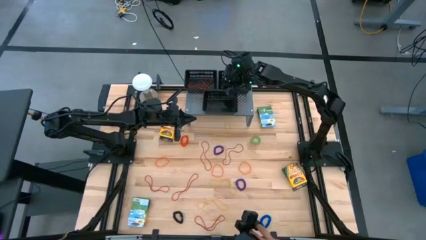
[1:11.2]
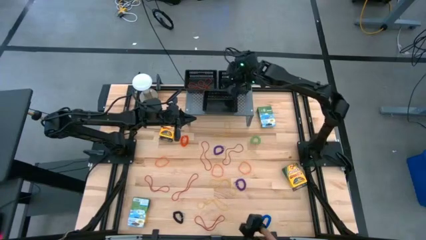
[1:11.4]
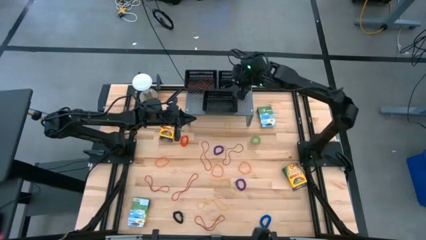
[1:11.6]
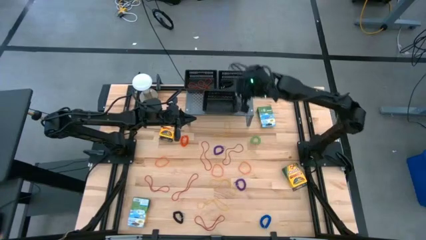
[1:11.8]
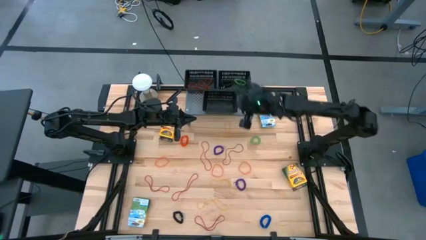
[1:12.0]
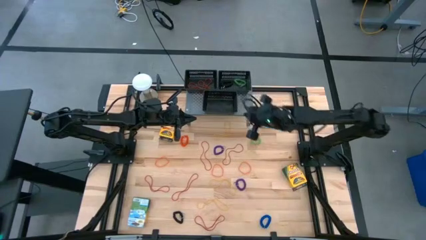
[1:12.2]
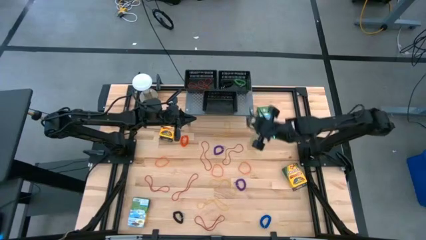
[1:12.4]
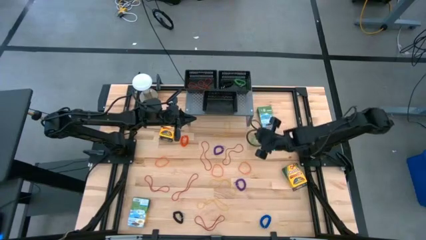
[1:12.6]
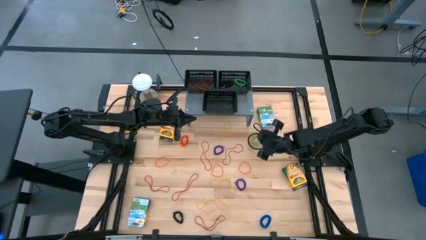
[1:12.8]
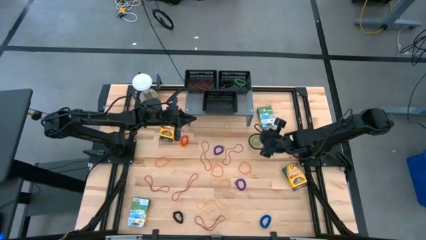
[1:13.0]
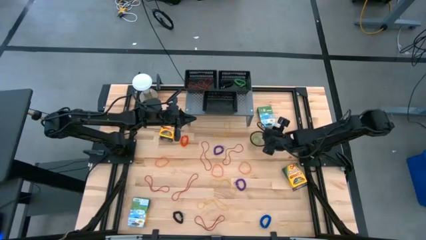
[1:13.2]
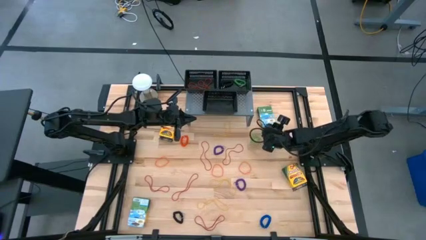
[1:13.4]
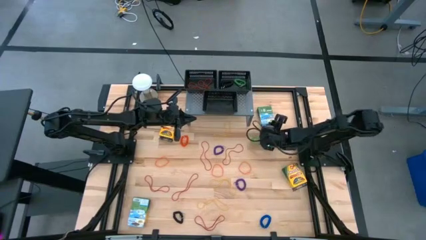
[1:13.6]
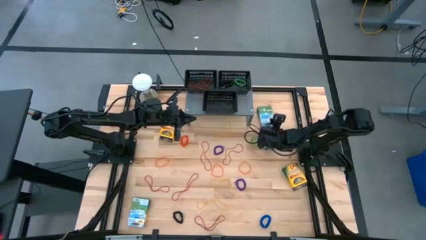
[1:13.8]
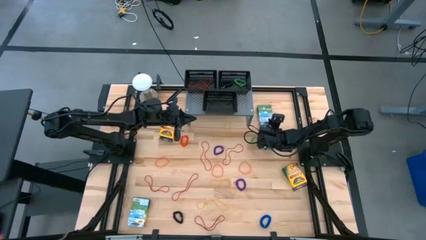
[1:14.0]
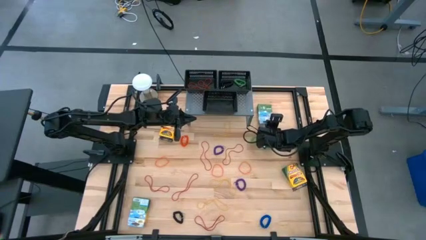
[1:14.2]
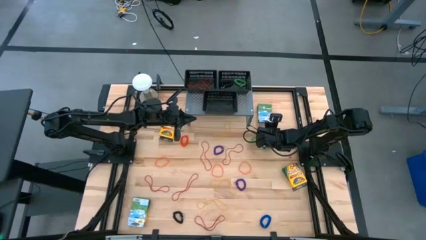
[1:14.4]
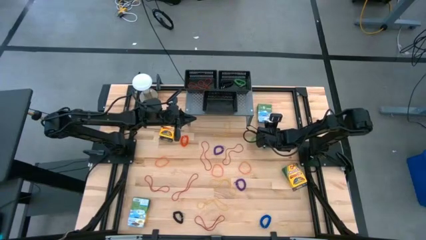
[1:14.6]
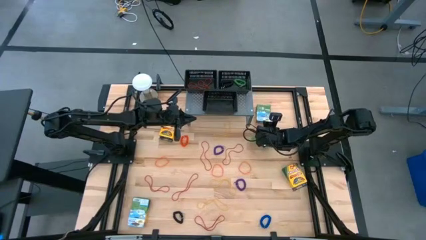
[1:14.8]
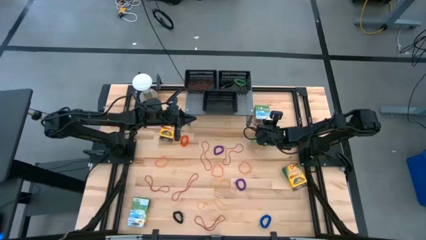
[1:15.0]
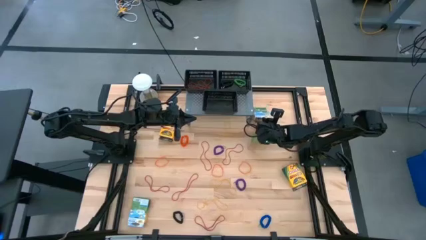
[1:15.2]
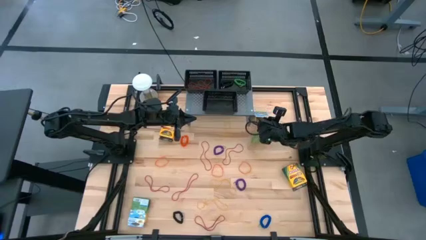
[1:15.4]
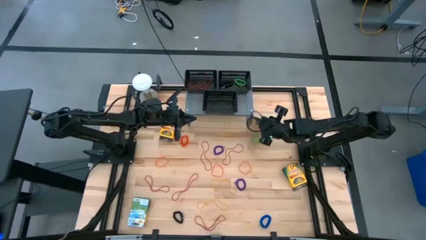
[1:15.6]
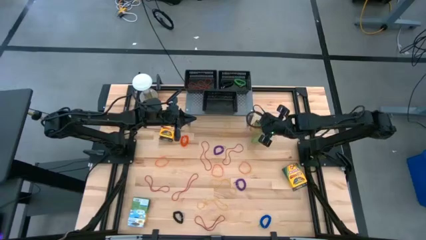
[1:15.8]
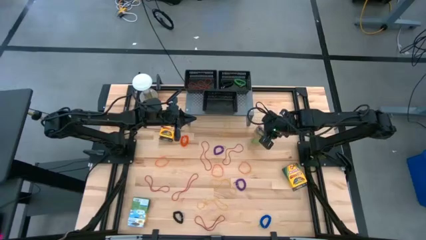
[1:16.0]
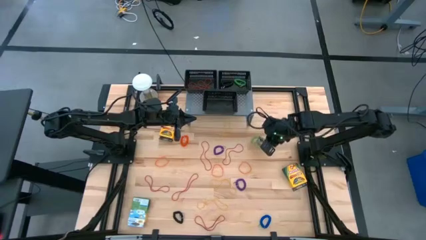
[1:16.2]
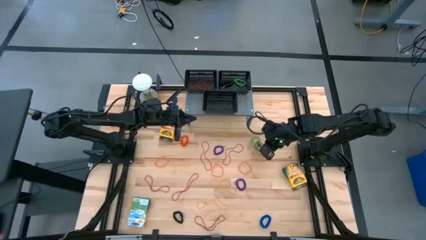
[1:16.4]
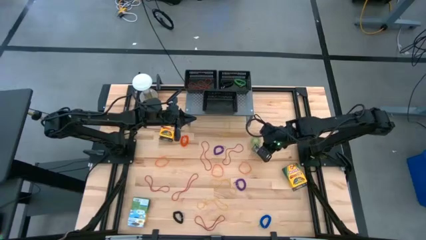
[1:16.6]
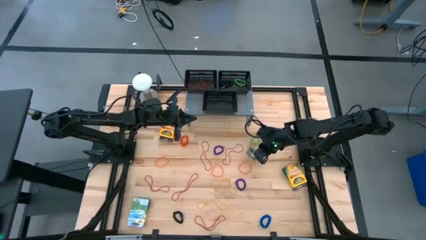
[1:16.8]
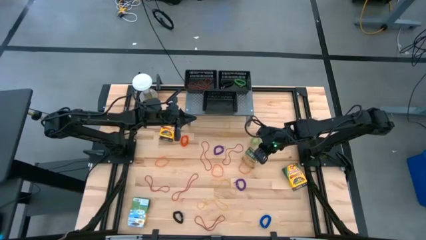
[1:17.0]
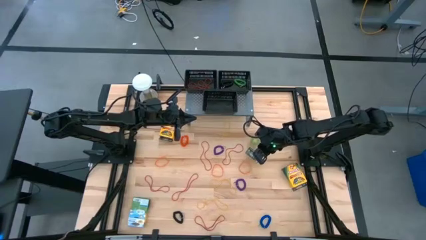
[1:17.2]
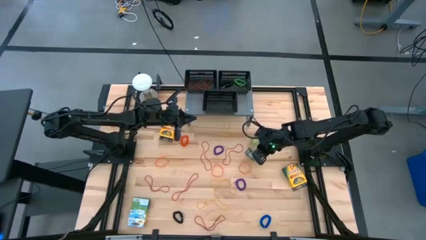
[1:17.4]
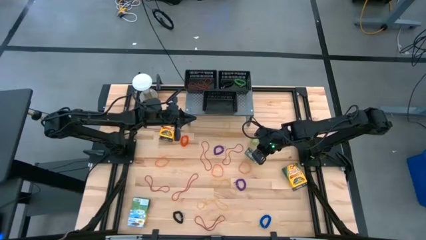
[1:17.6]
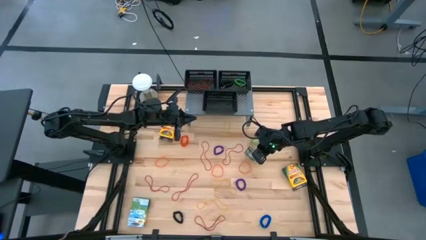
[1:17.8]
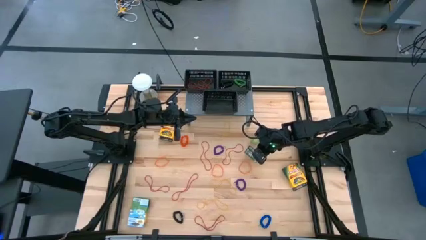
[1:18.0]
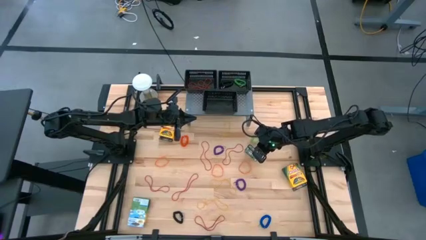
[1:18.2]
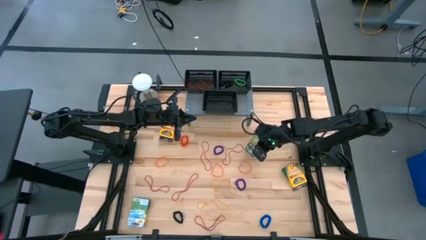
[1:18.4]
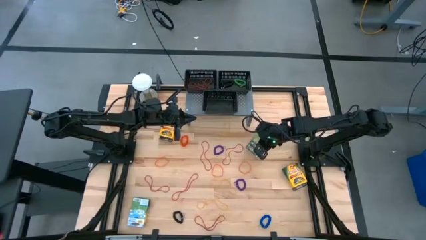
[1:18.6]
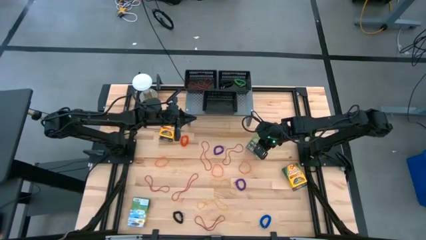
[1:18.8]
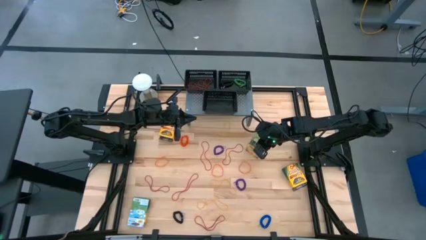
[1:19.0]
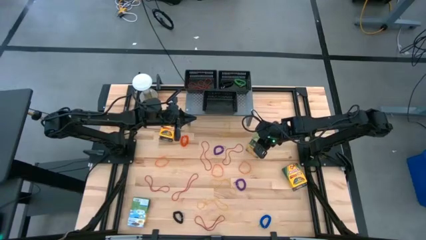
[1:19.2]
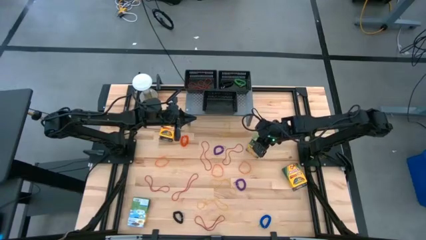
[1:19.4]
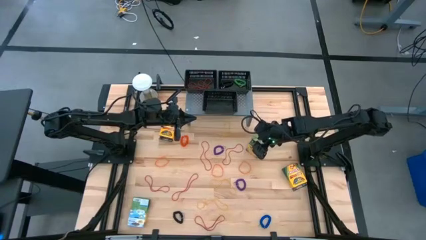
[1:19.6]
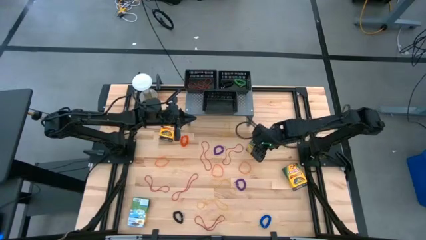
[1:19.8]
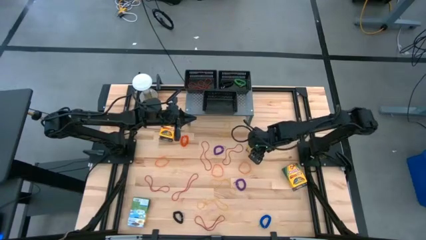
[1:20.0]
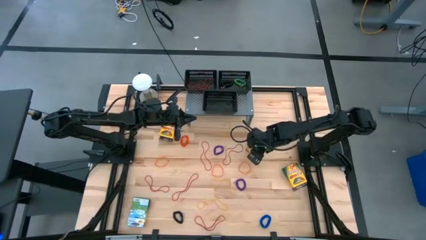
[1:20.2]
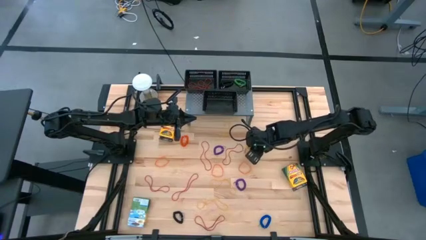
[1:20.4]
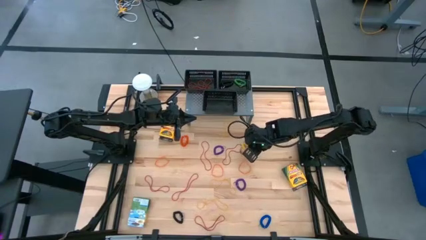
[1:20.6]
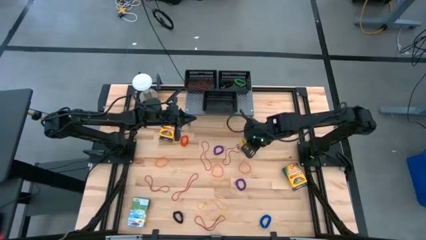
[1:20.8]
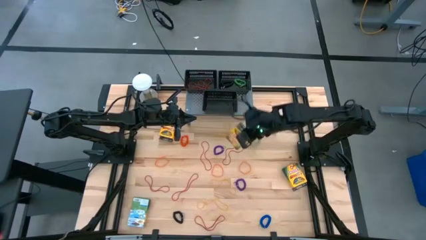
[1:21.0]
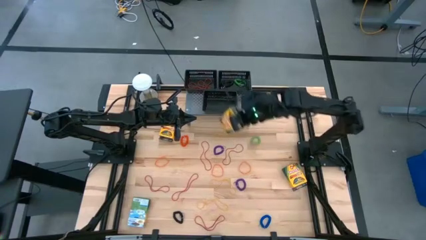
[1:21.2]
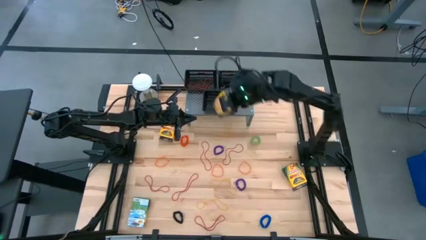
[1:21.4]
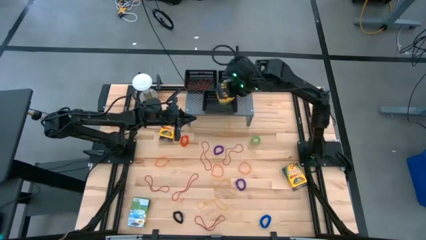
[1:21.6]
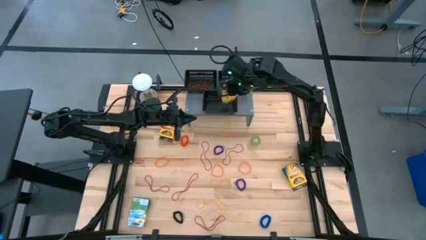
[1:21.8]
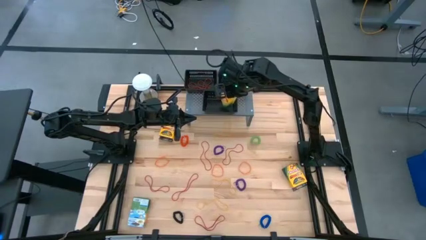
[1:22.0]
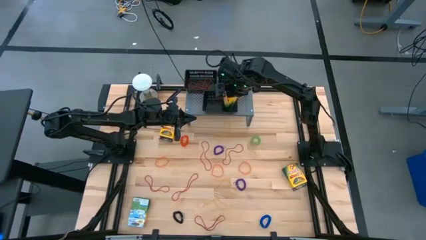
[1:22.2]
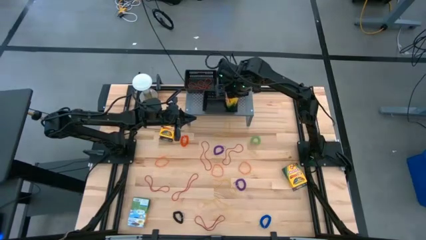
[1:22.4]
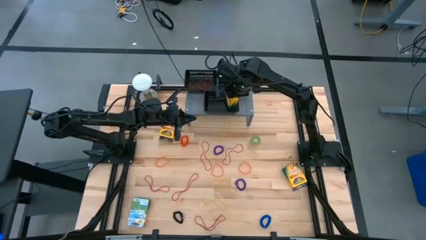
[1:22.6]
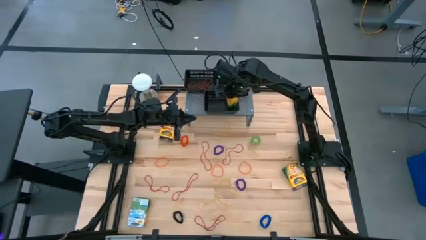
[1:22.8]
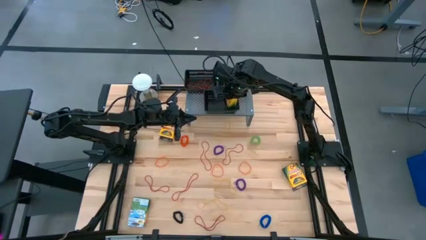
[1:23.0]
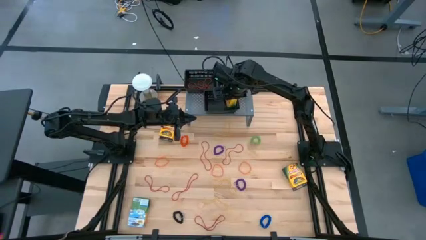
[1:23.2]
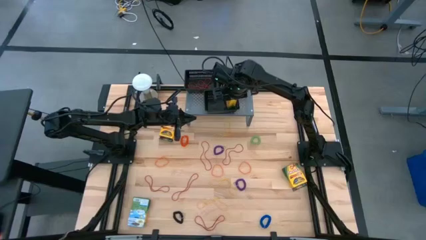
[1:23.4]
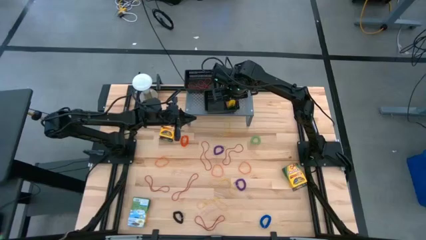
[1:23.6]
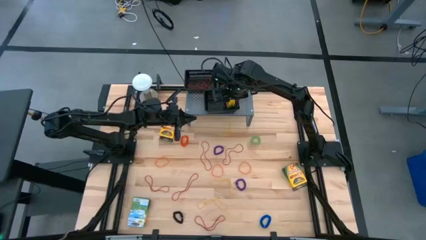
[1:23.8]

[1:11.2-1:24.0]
Task: Pick & Place Office Desk Supplies
Put the crayon box into the bottom black basket on the shelf
